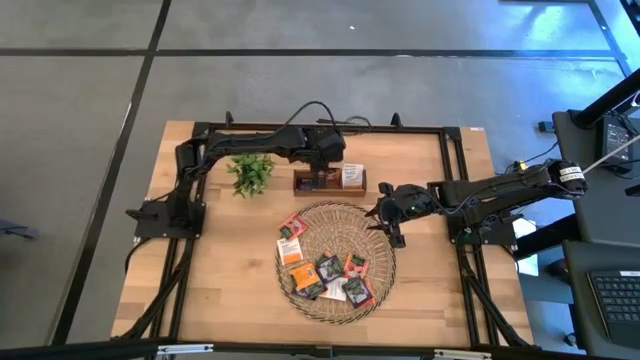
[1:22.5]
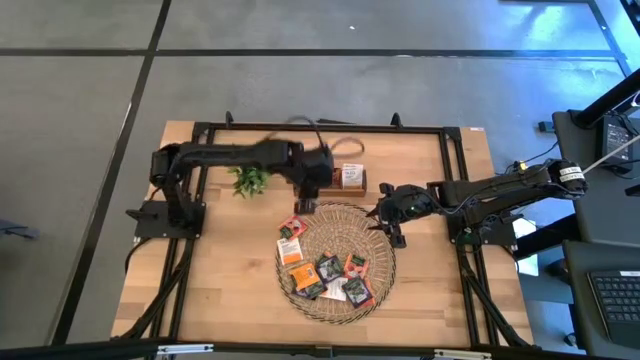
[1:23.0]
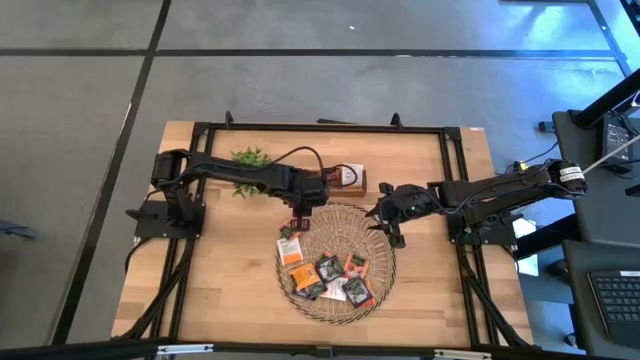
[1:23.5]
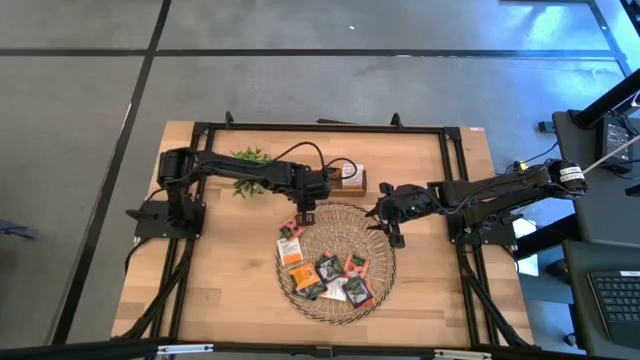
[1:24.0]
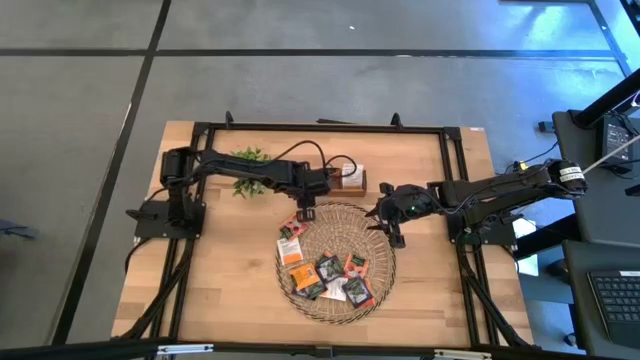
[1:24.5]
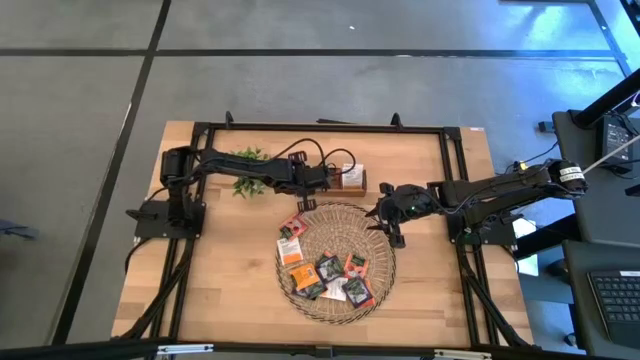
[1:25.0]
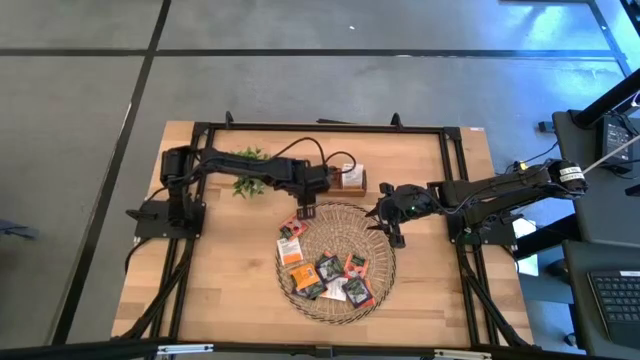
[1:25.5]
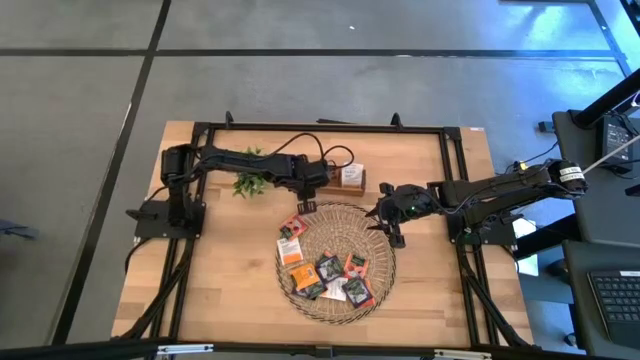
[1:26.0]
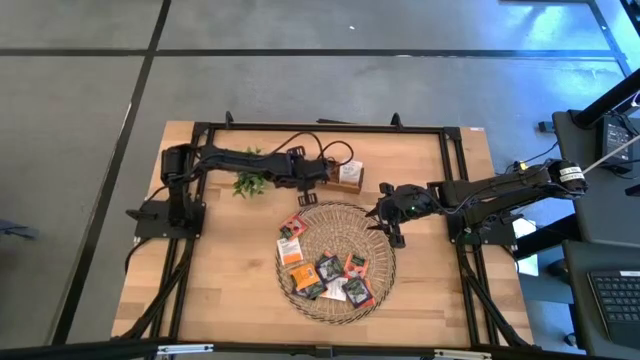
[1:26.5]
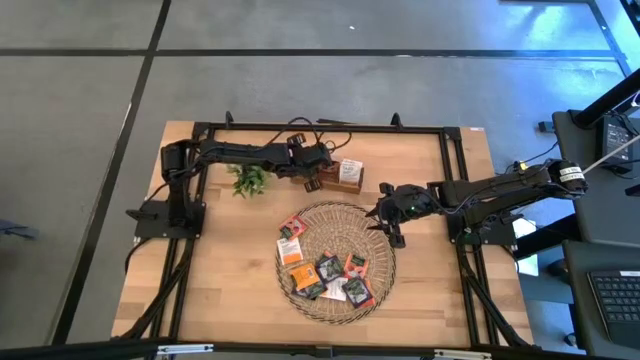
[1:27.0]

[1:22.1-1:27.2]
Task: Pick & Place Tea
Adjust the black and white tea bag in the wooden organizer

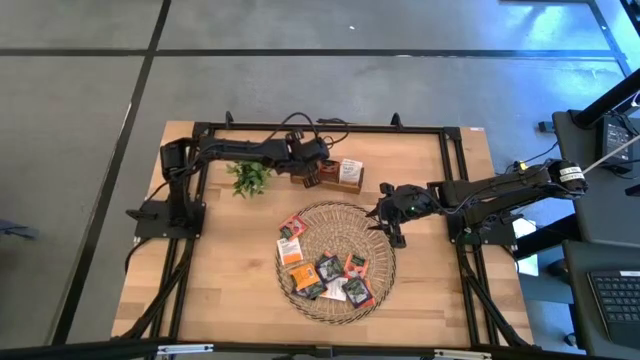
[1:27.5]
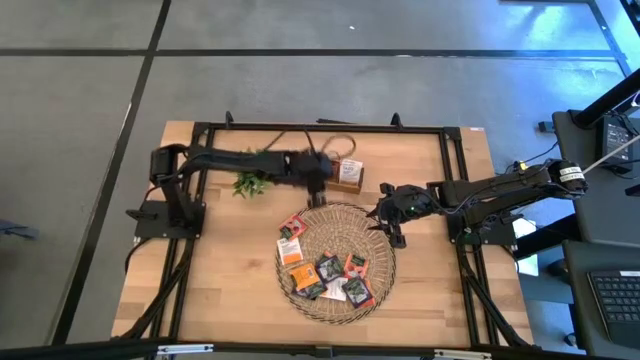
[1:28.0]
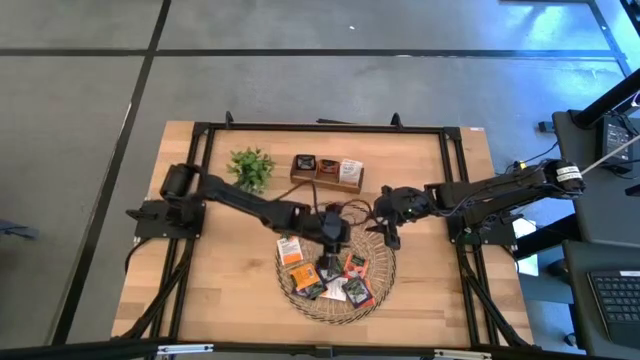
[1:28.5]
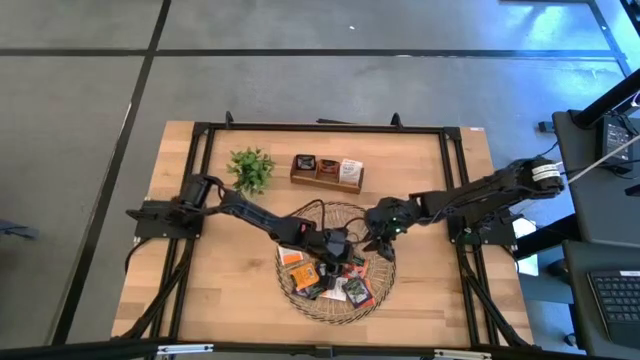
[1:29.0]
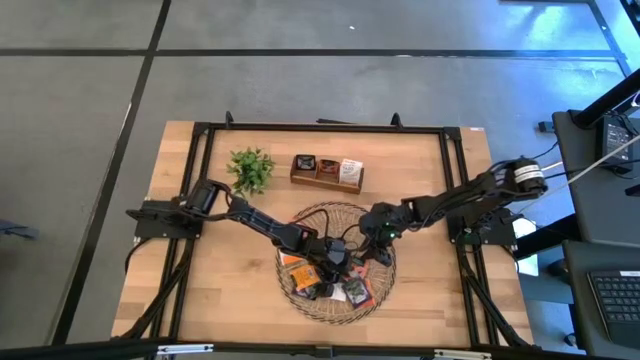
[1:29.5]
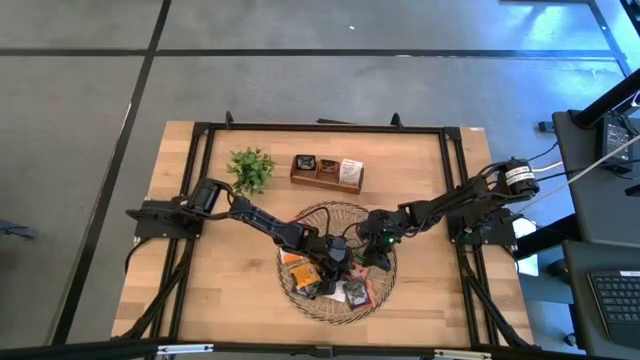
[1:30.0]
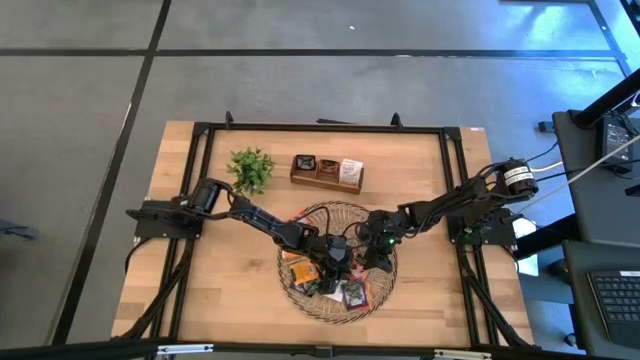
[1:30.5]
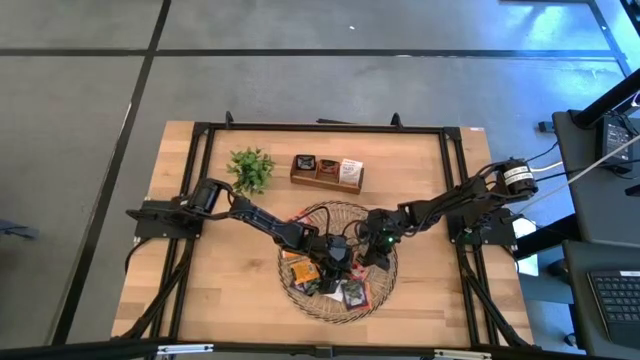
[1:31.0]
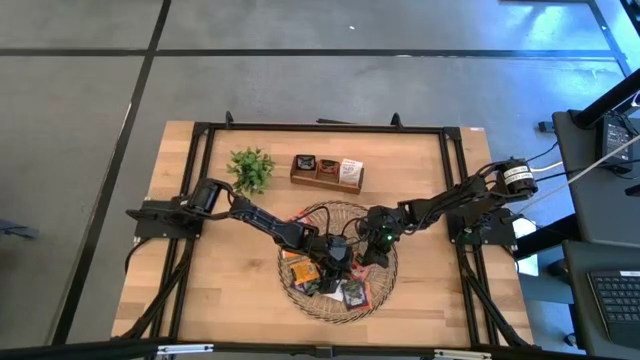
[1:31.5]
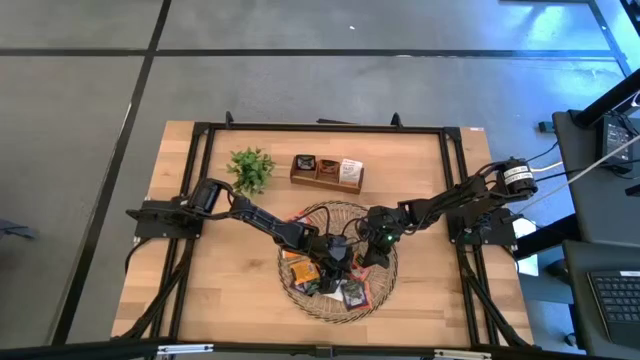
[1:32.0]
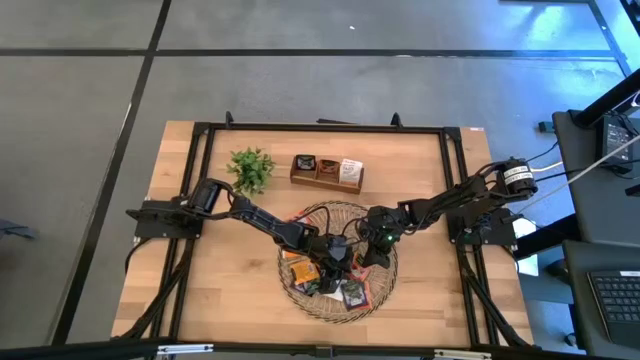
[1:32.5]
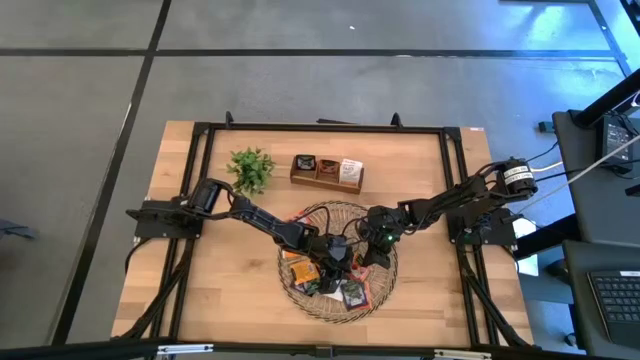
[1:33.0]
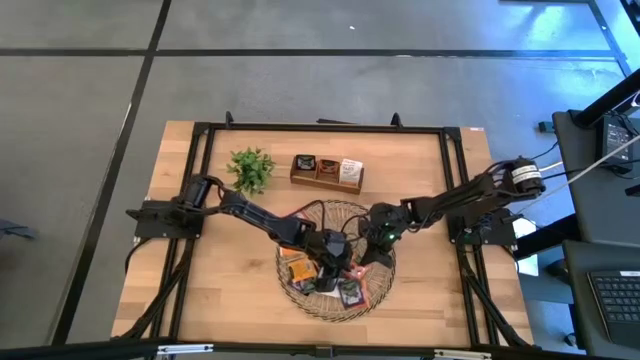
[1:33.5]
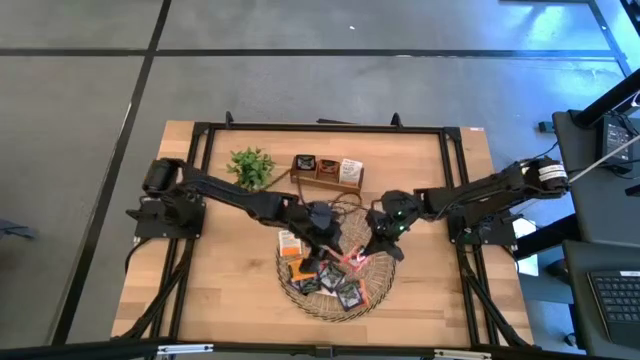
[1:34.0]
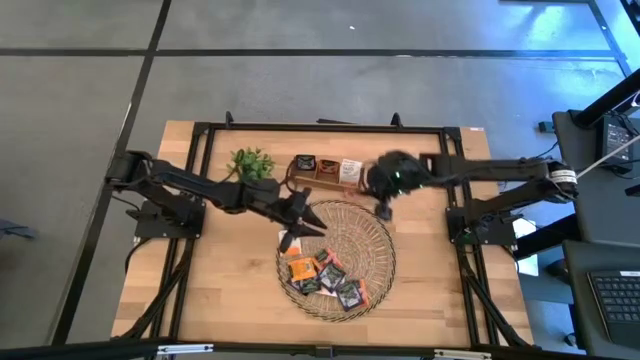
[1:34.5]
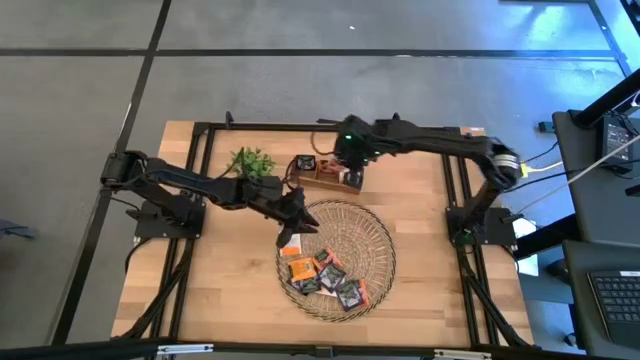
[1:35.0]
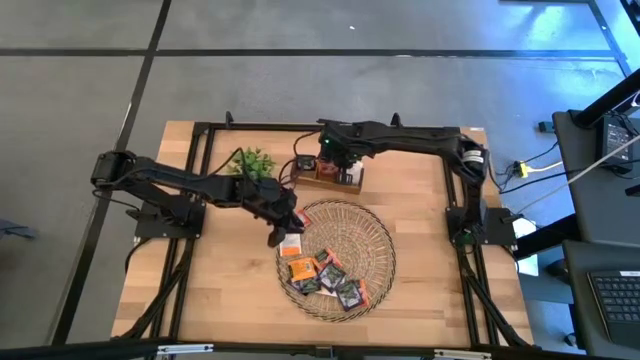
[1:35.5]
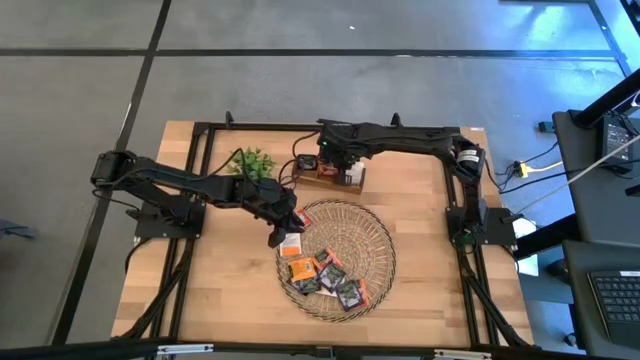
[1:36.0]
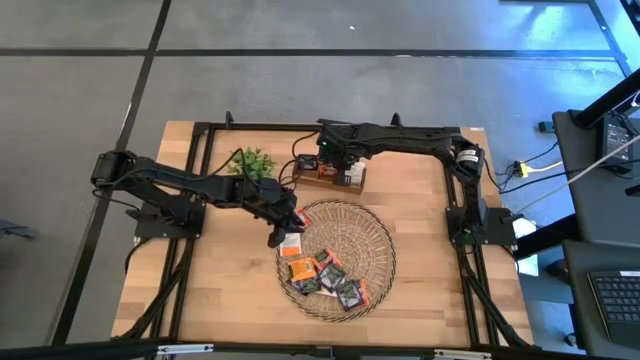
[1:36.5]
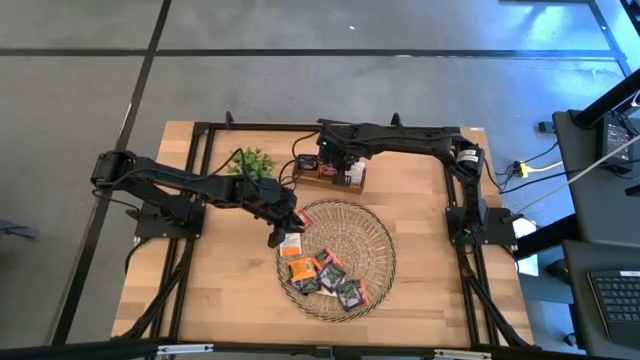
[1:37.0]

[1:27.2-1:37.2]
Put the orange and black tea bag into the middle section of the wooden organizer

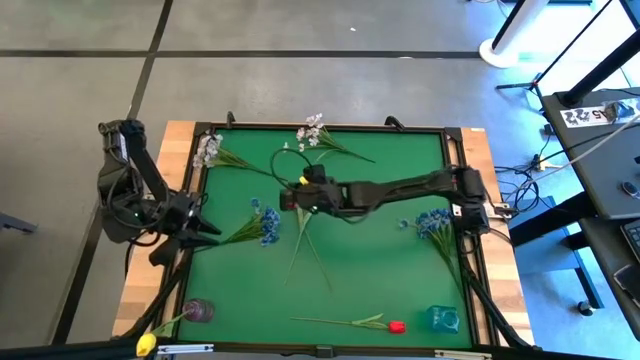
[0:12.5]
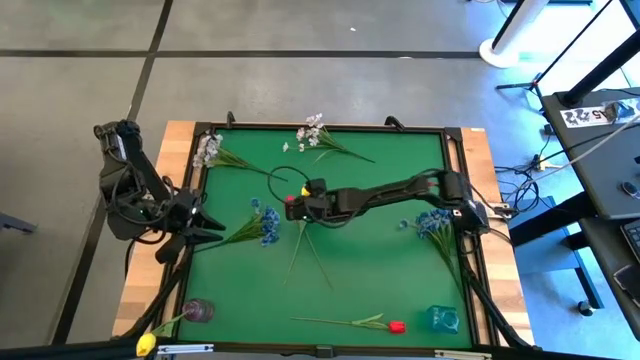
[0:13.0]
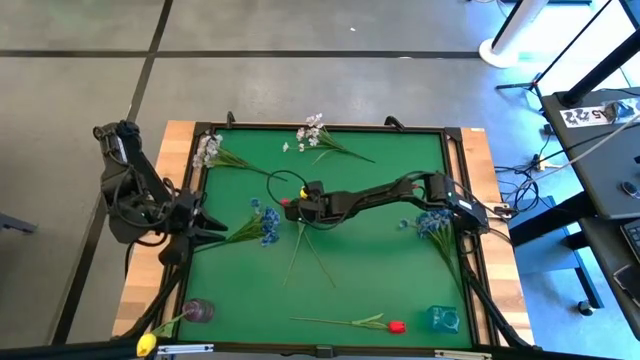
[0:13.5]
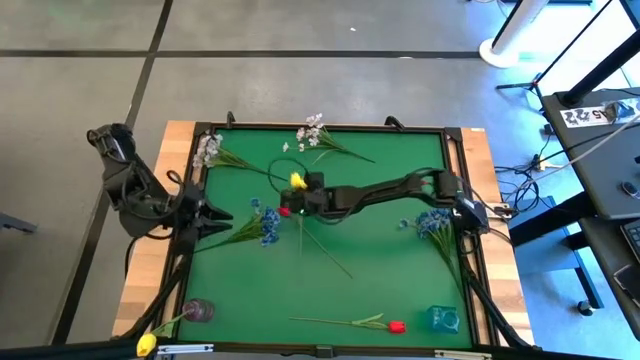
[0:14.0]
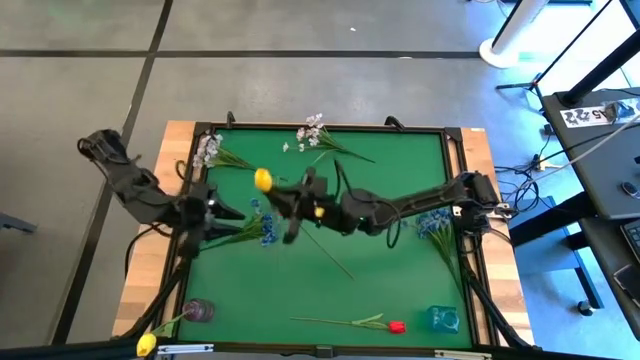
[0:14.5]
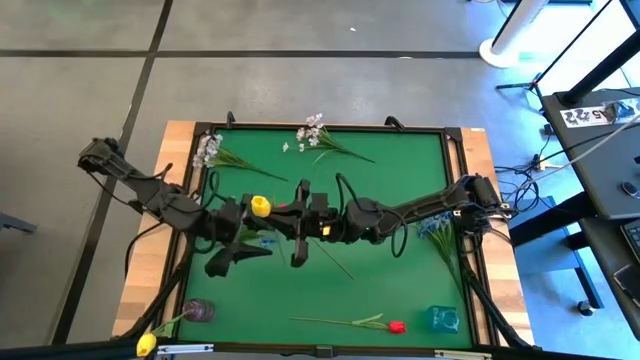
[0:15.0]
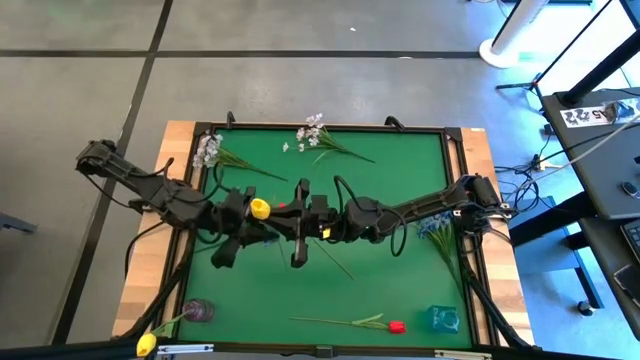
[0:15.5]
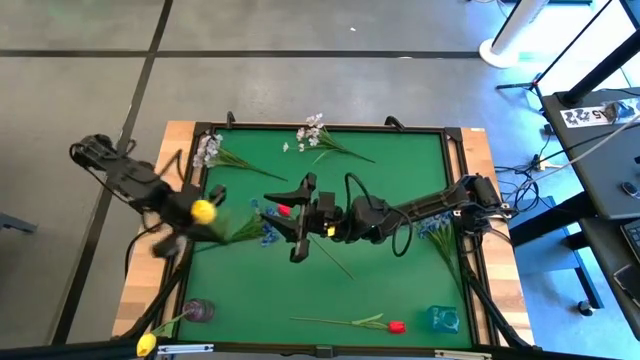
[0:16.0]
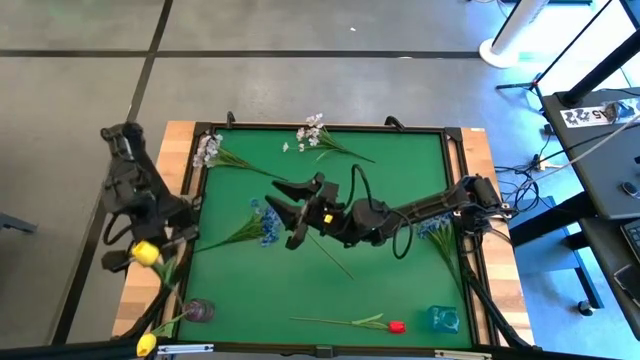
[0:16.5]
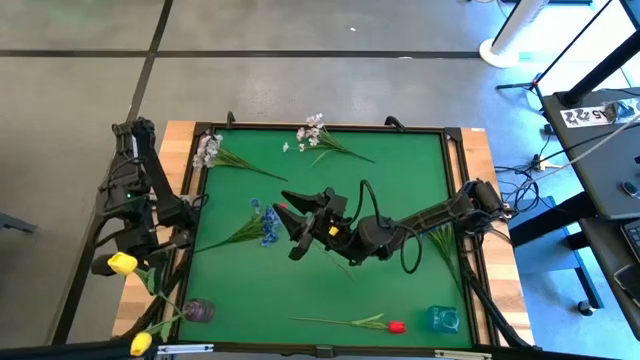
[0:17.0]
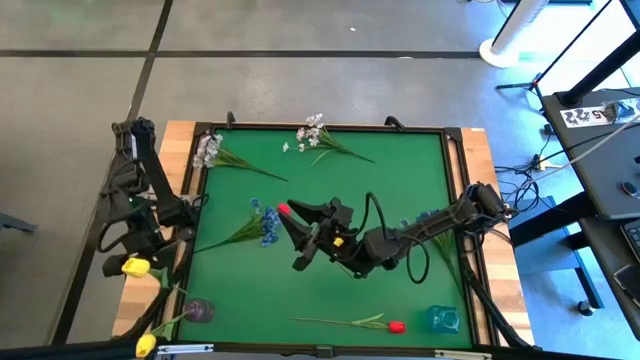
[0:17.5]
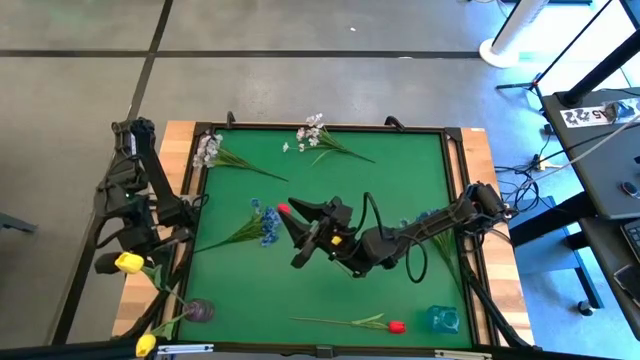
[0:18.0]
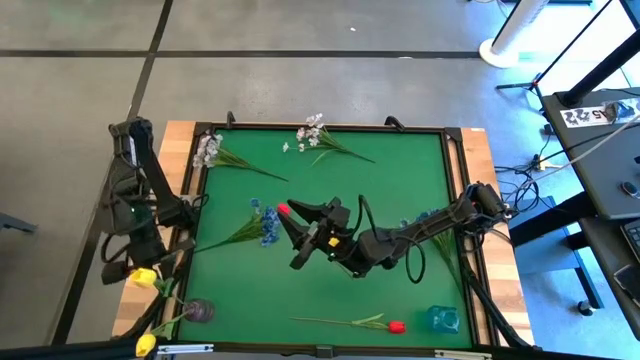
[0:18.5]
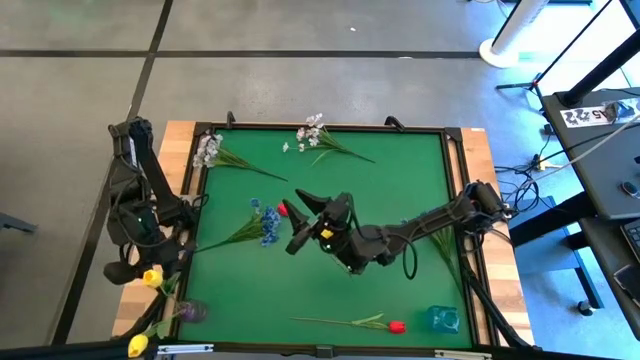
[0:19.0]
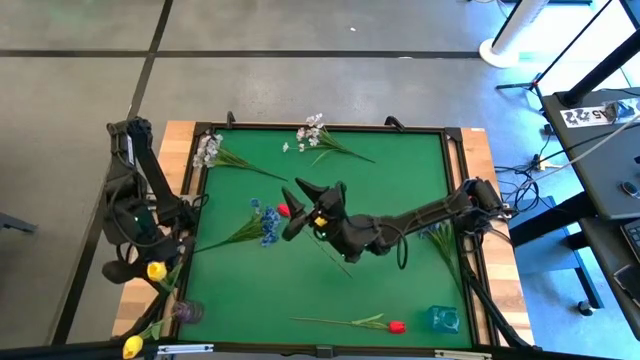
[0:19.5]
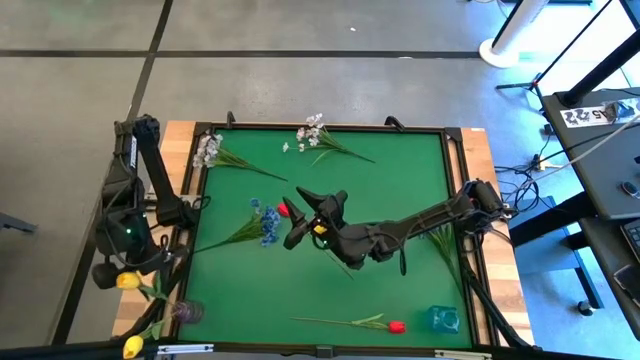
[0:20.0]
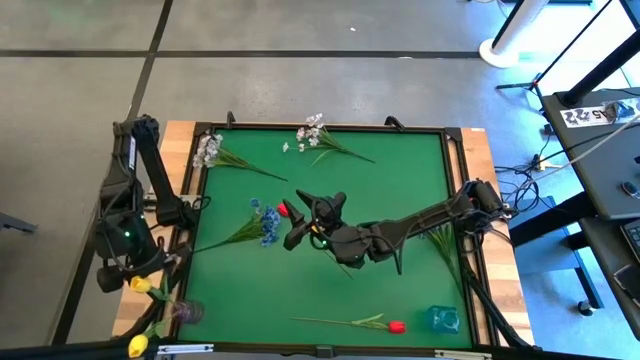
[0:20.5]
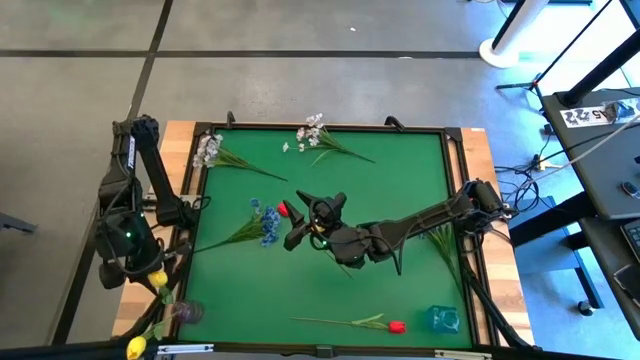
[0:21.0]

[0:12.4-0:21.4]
Task: Sort flowers into vase by color
Put the yellow tulip into the purple vase
